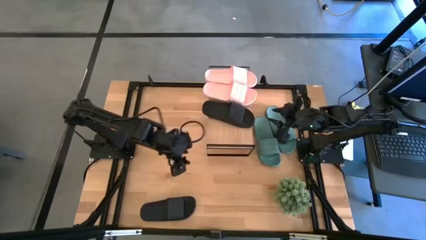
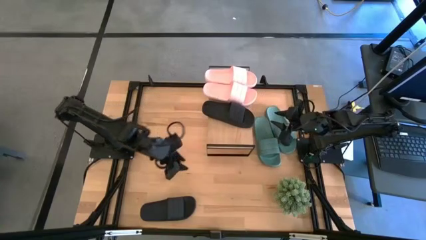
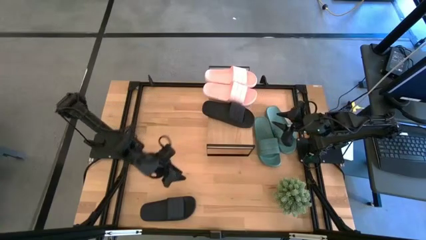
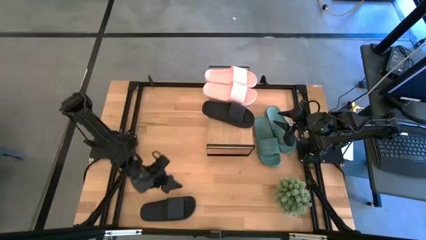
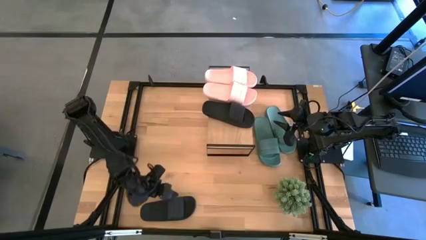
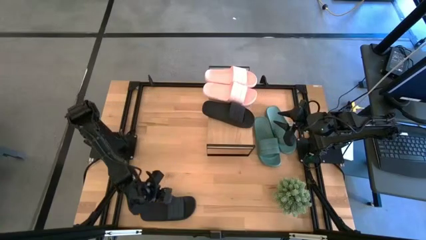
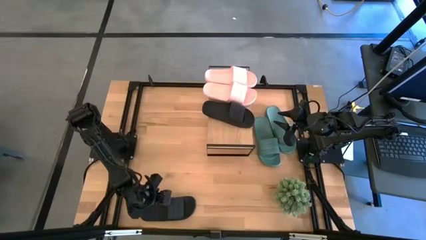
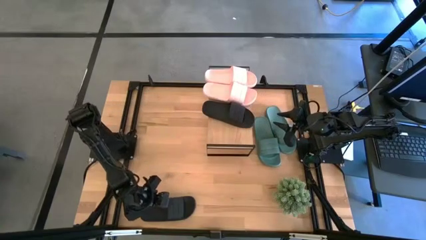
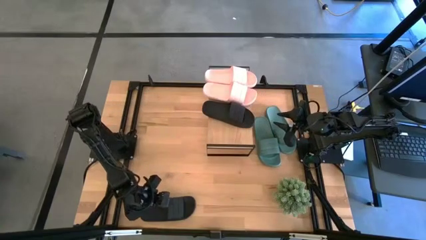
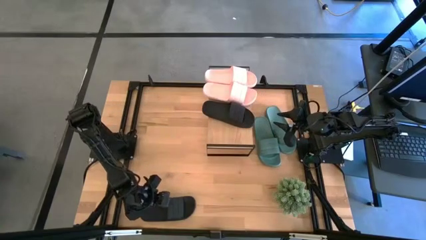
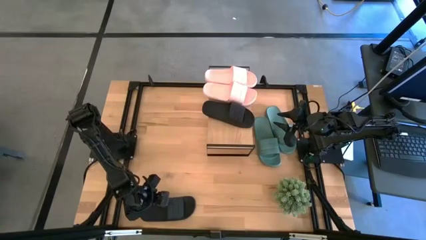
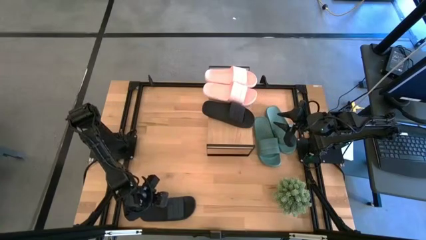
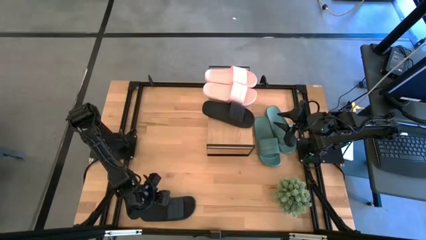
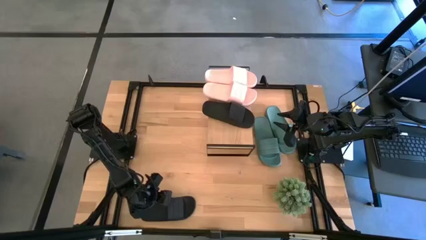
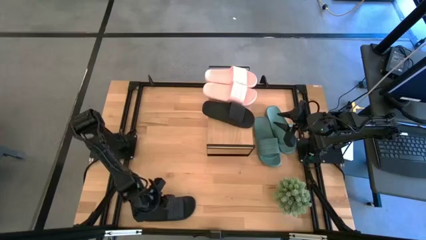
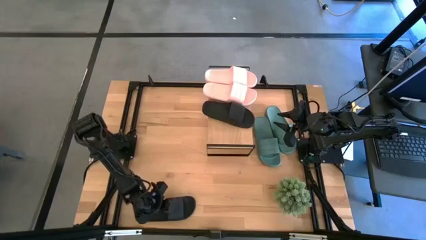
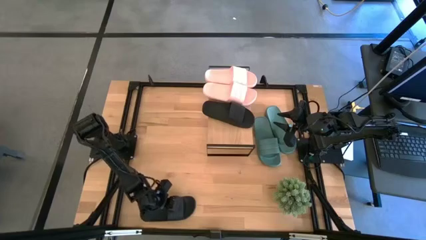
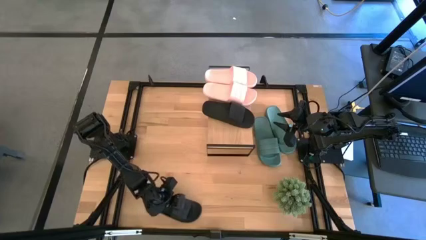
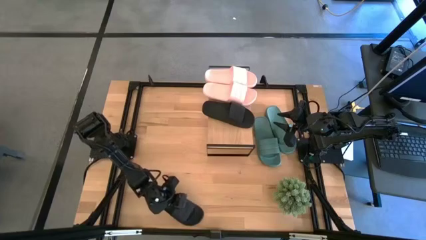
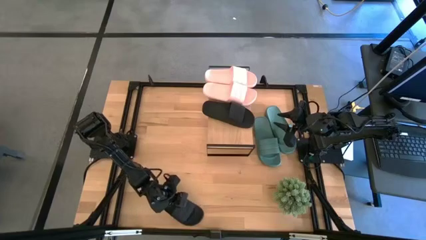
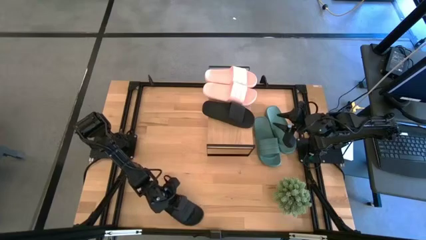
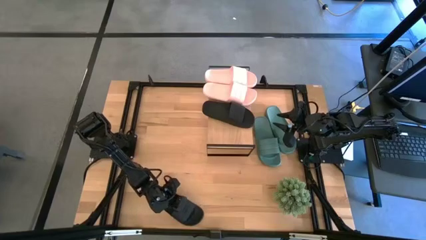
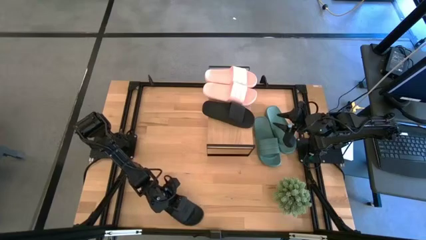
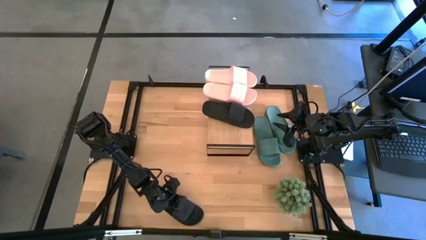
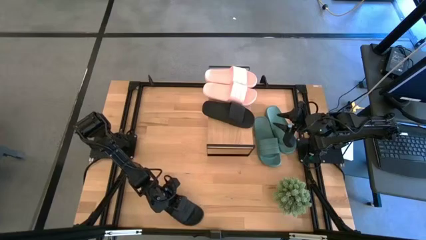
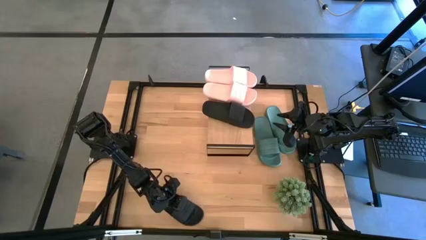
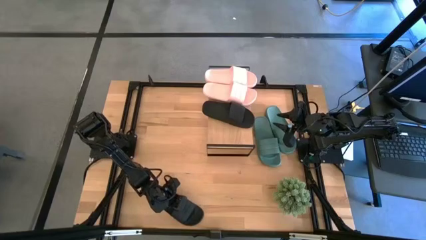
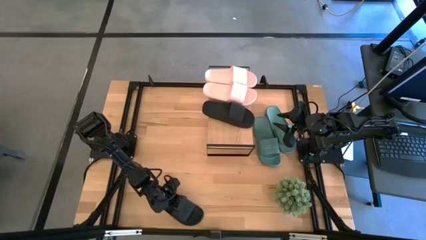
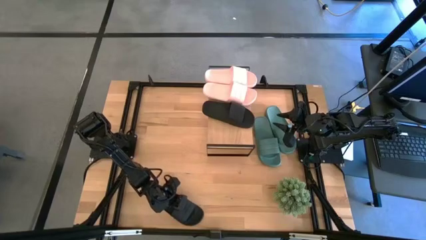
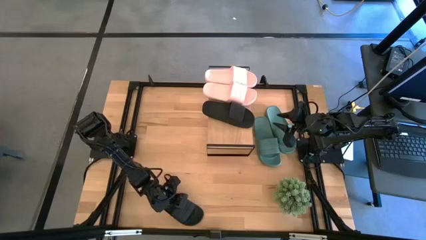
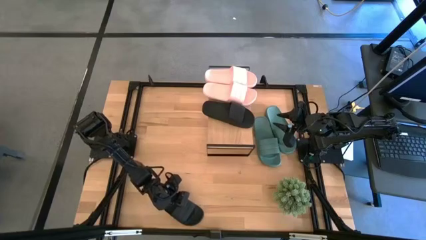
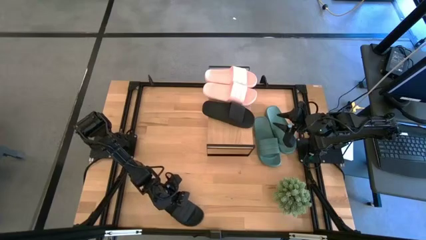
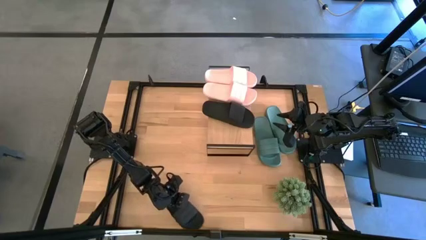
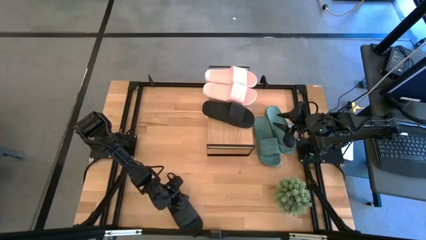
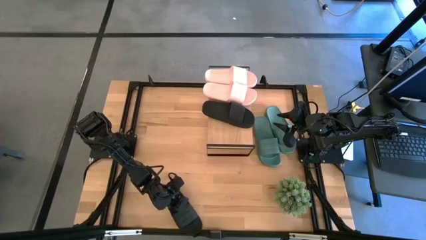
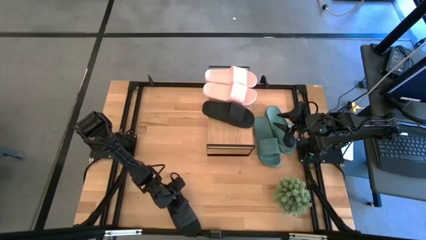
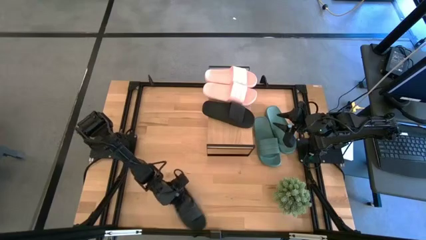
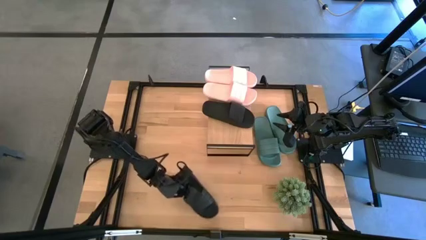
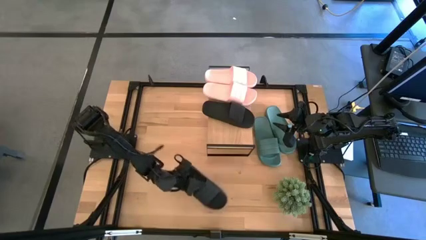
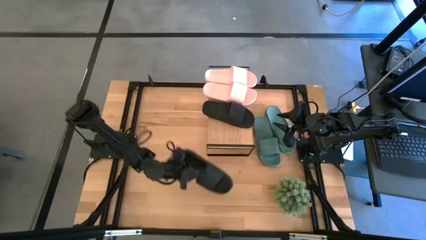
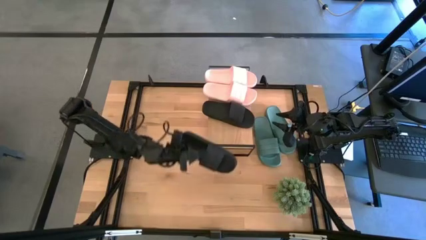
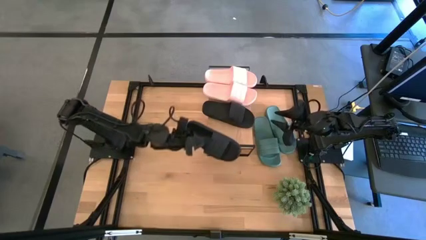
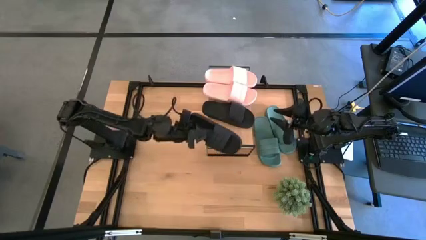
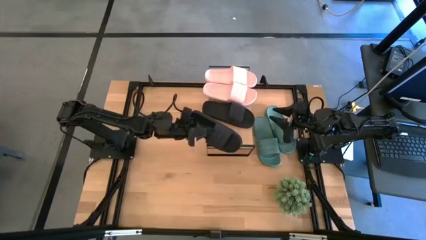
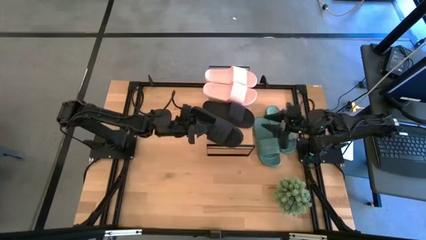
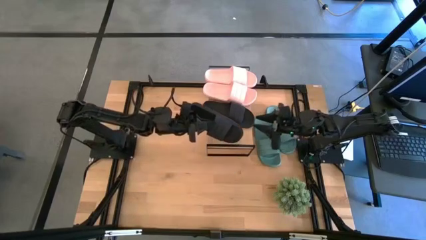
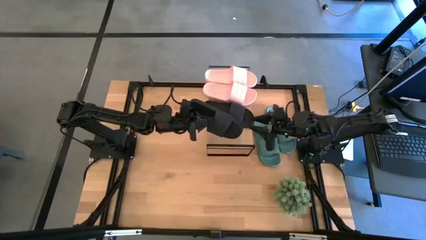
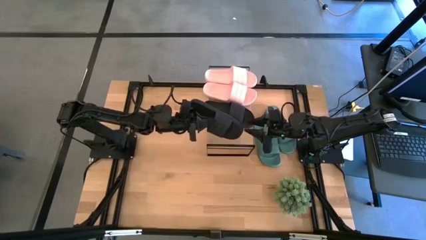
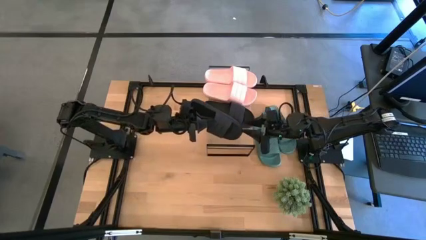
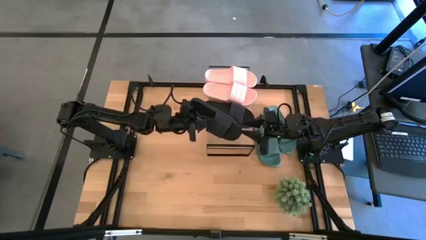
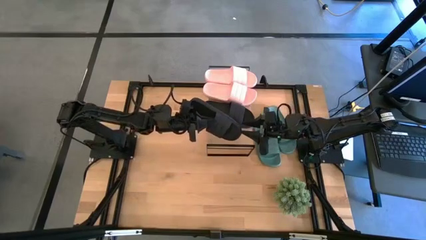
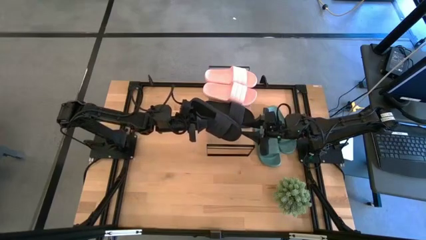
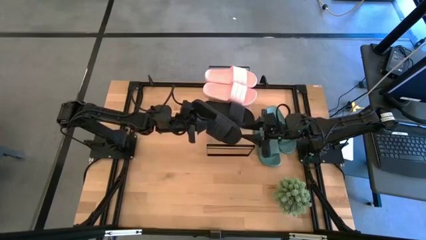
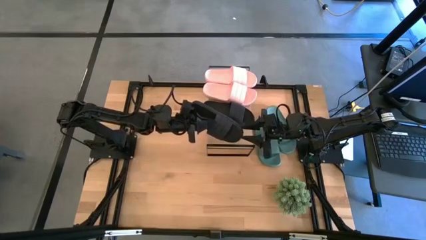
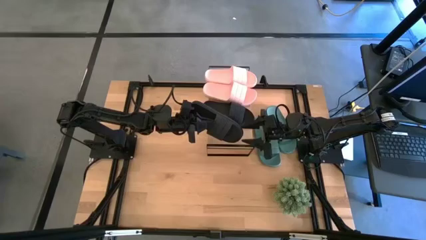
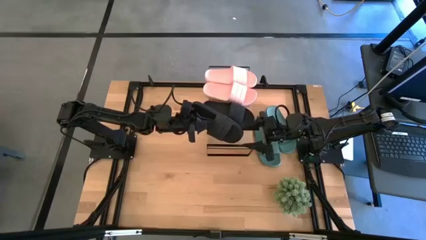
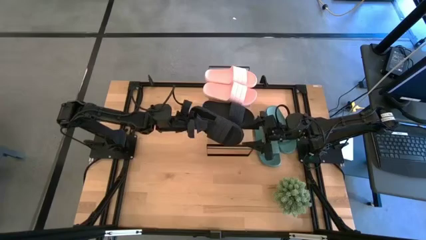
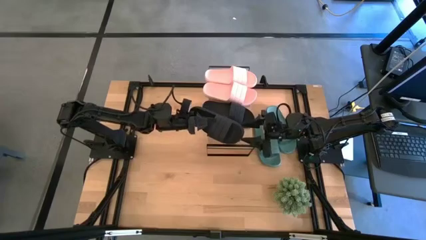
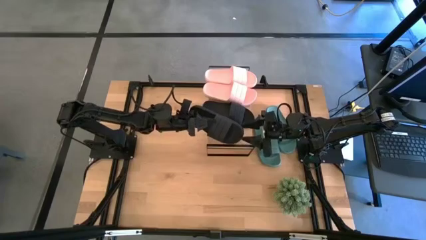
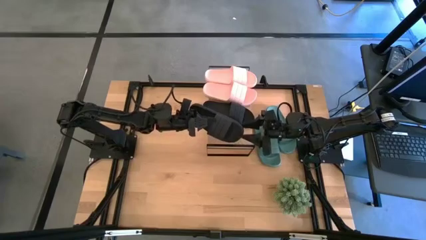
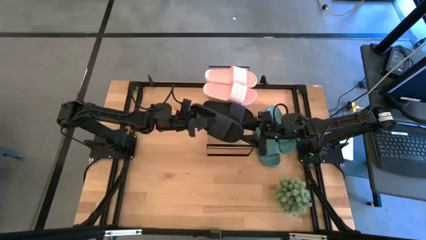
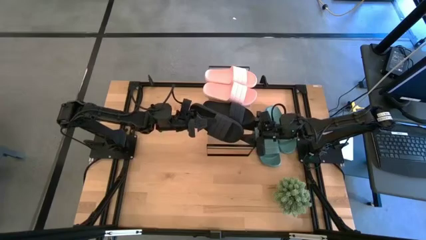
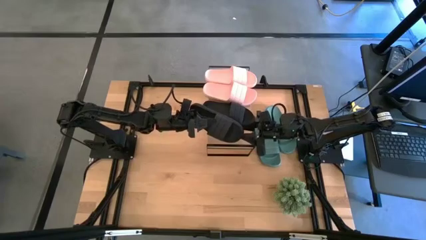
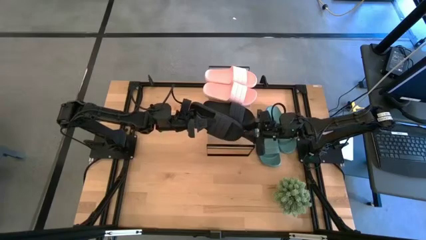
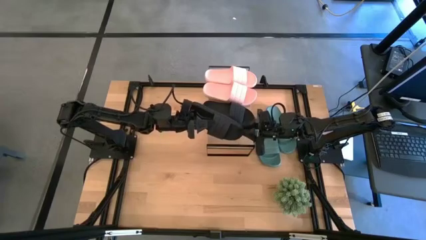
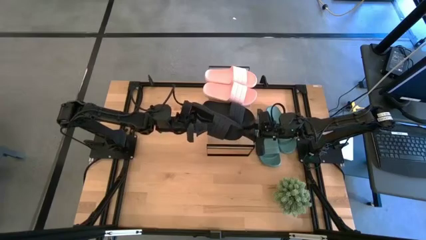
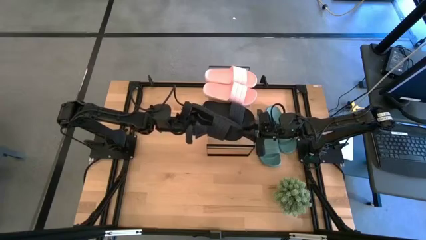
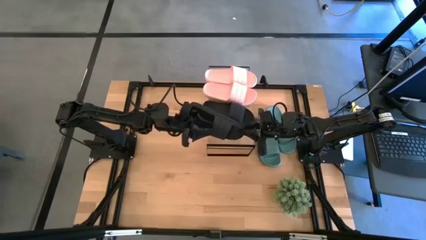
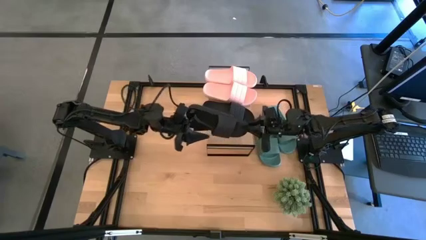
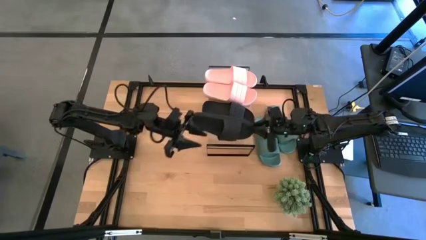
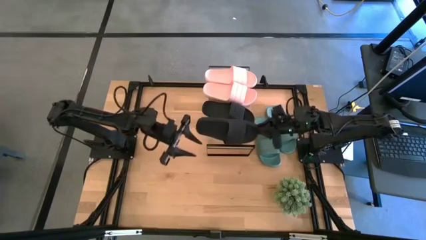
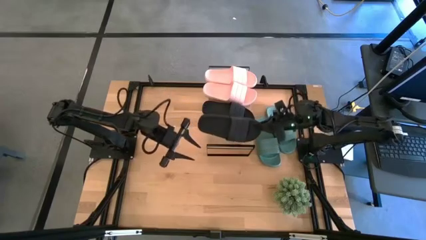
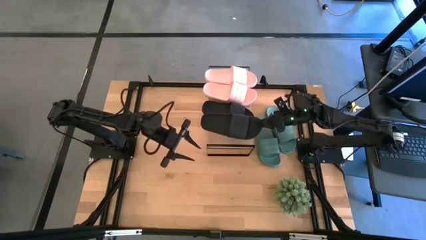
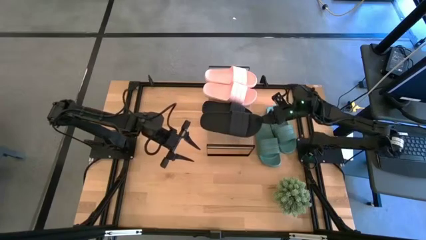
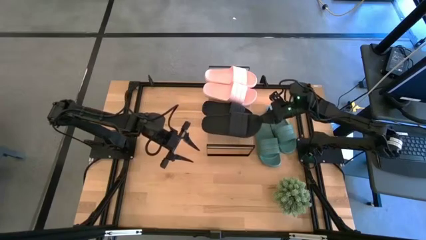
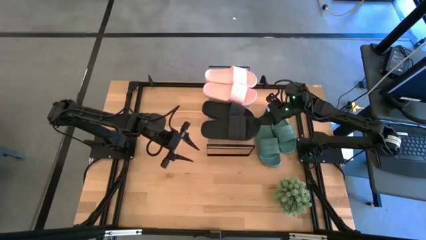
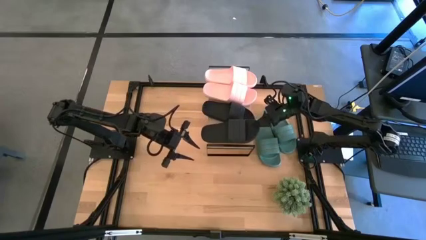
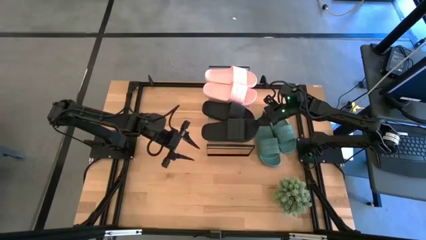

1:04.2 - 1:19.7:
Task: Pick and place slides into the shelf
Put the black slide on the shelf
